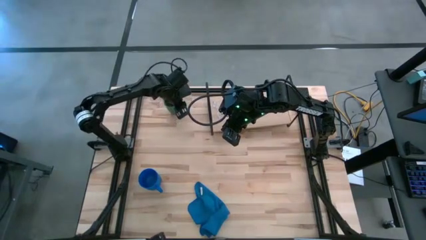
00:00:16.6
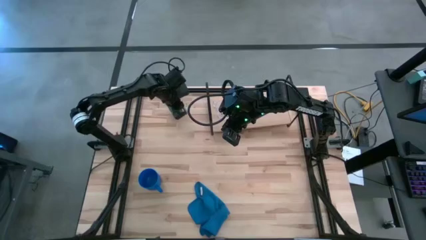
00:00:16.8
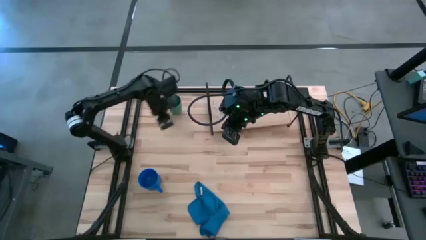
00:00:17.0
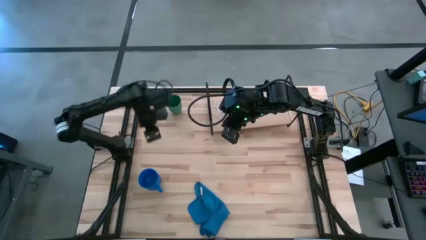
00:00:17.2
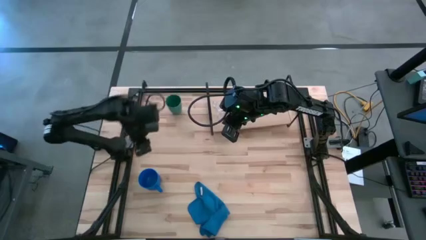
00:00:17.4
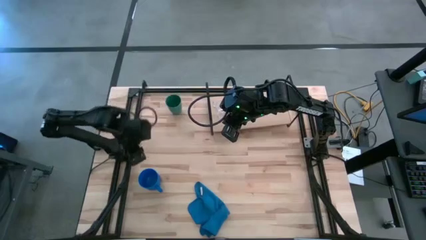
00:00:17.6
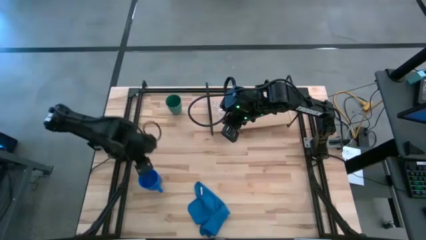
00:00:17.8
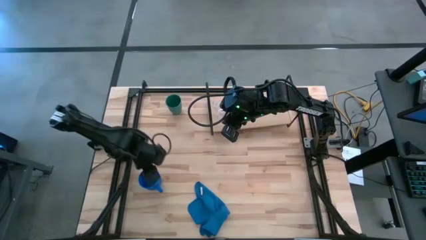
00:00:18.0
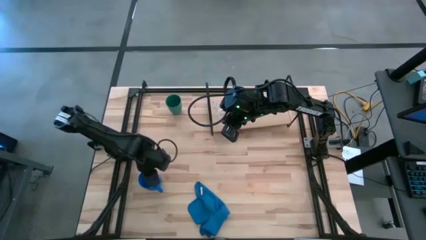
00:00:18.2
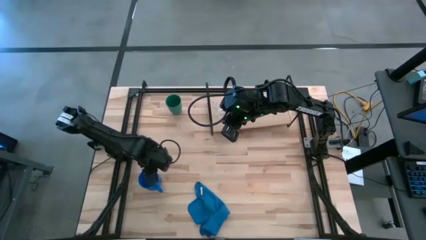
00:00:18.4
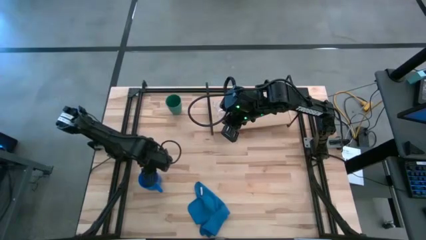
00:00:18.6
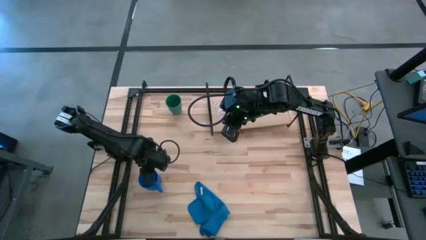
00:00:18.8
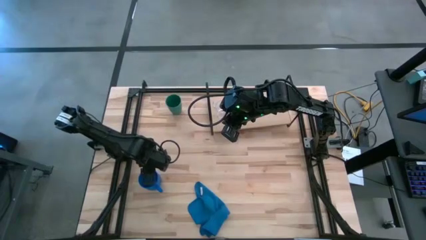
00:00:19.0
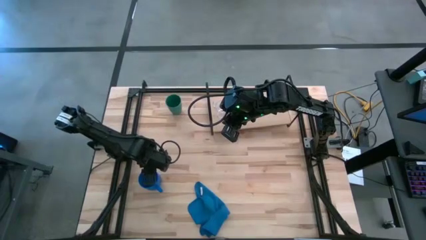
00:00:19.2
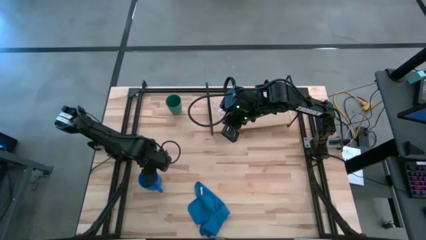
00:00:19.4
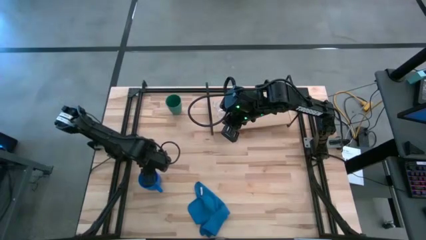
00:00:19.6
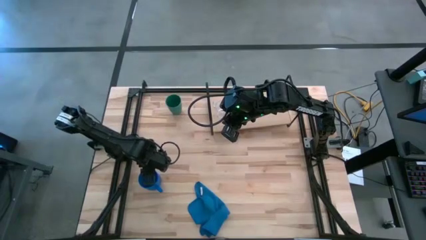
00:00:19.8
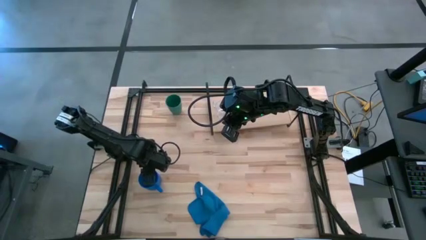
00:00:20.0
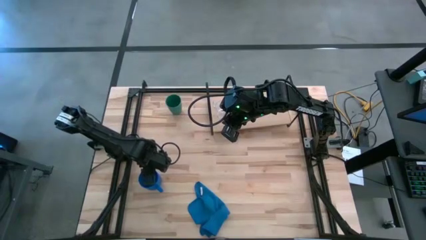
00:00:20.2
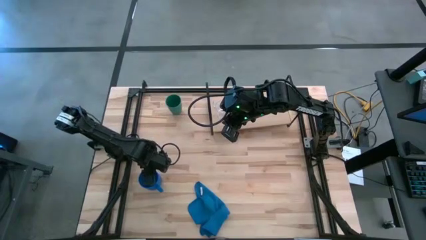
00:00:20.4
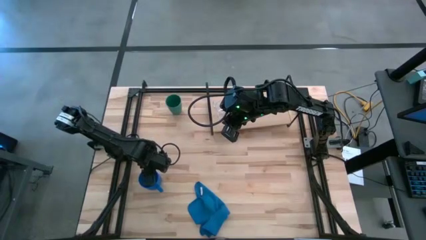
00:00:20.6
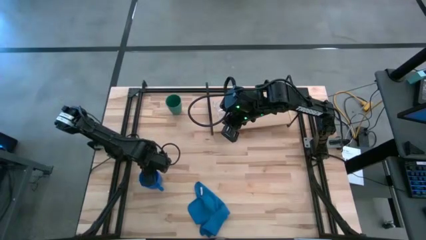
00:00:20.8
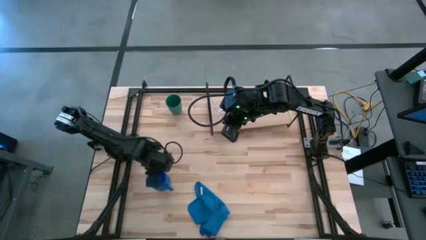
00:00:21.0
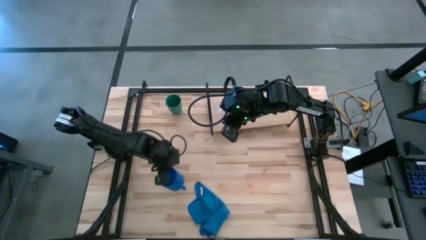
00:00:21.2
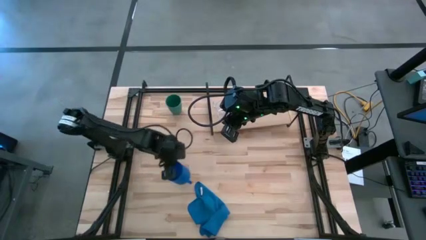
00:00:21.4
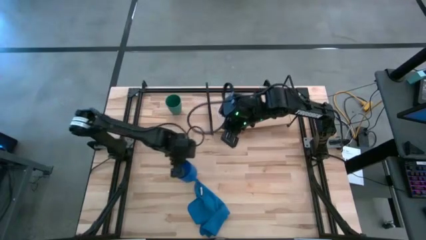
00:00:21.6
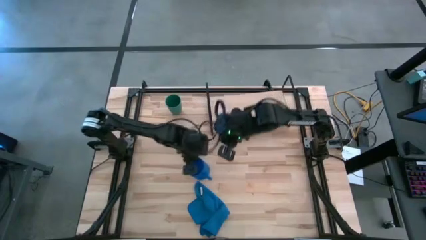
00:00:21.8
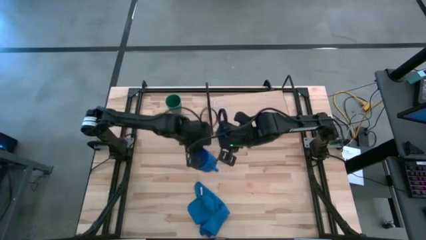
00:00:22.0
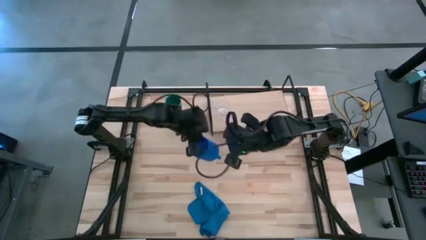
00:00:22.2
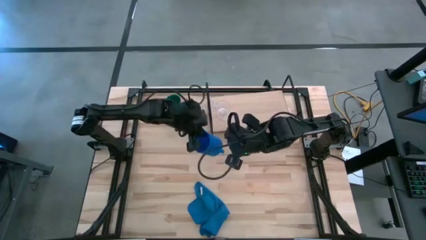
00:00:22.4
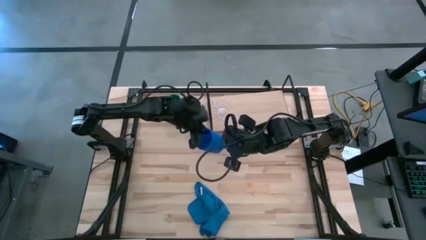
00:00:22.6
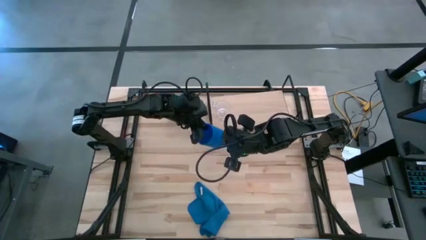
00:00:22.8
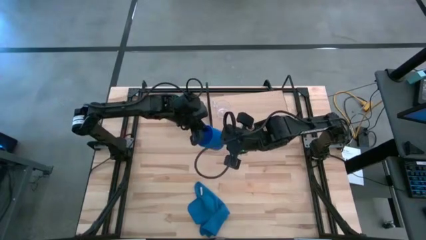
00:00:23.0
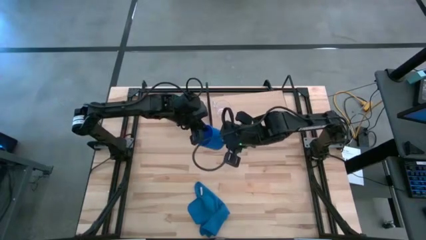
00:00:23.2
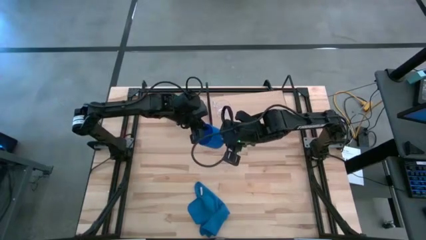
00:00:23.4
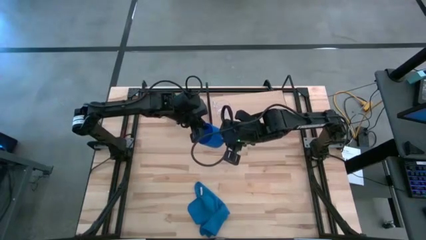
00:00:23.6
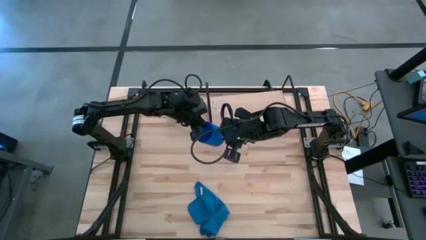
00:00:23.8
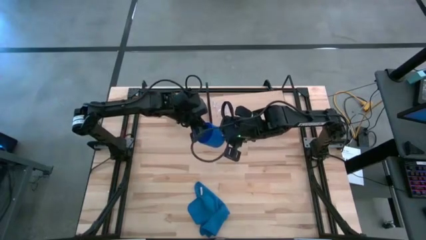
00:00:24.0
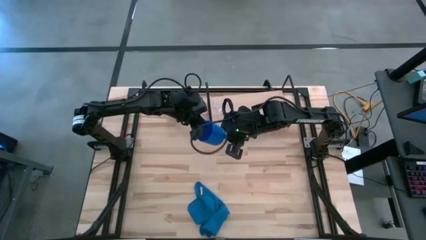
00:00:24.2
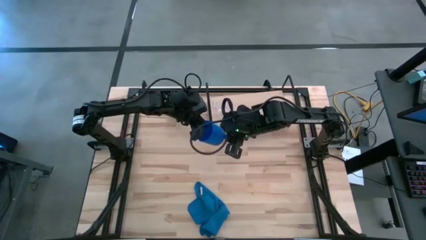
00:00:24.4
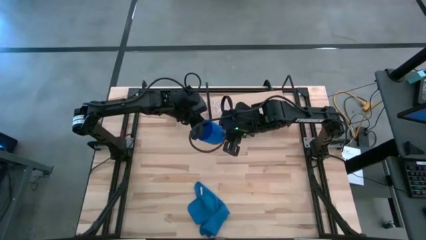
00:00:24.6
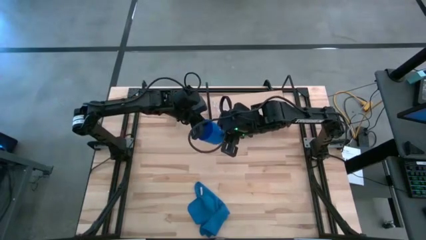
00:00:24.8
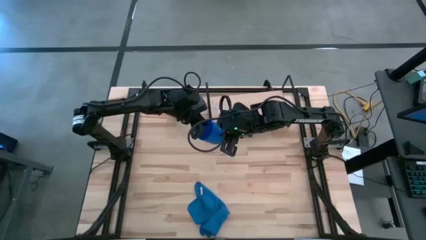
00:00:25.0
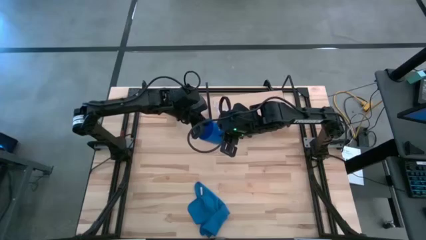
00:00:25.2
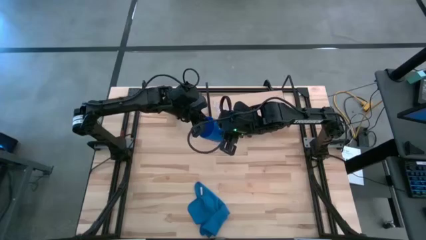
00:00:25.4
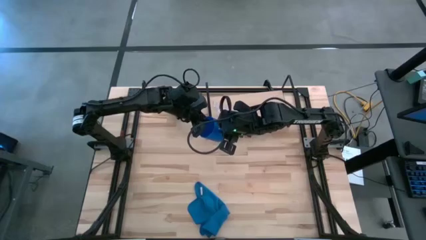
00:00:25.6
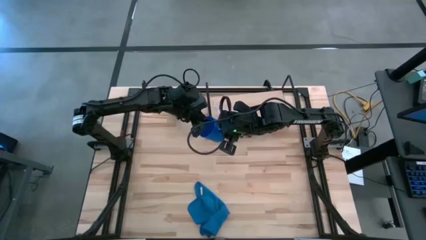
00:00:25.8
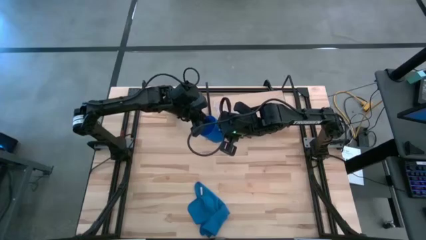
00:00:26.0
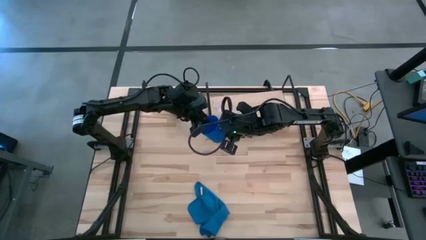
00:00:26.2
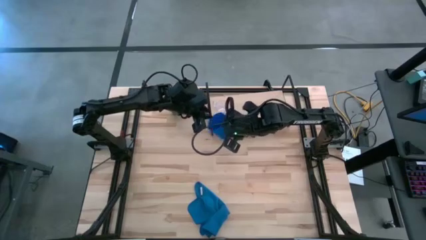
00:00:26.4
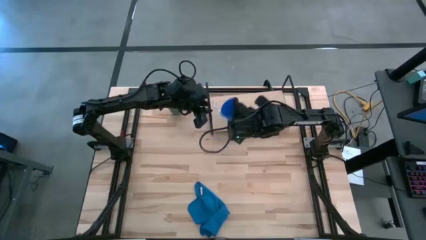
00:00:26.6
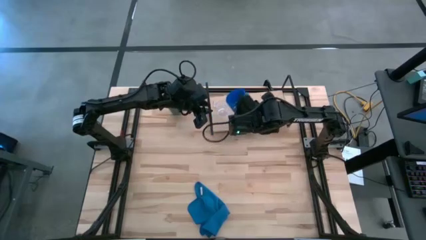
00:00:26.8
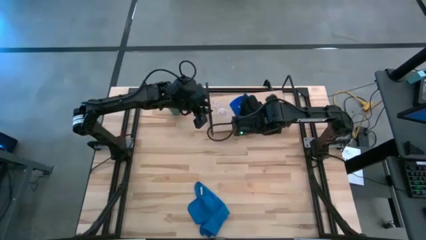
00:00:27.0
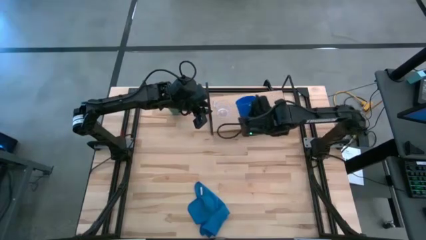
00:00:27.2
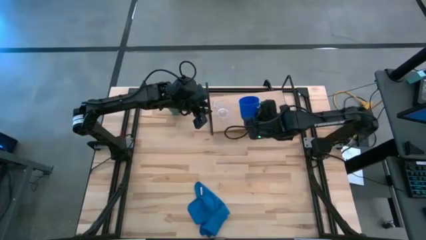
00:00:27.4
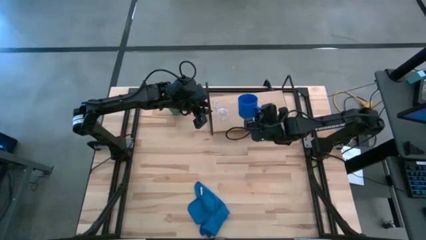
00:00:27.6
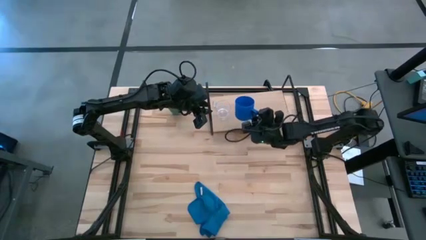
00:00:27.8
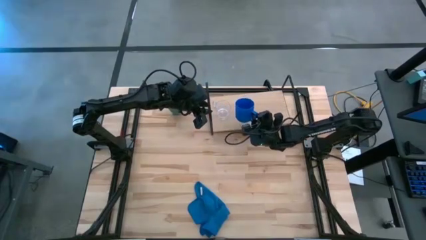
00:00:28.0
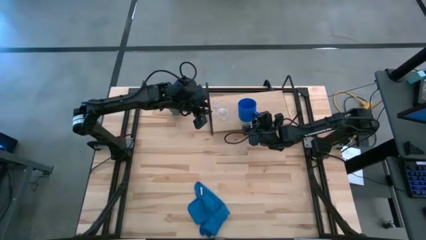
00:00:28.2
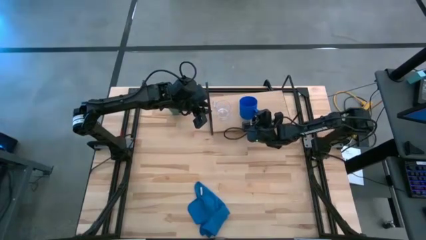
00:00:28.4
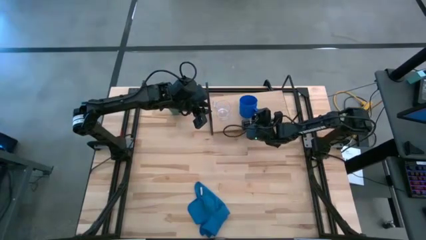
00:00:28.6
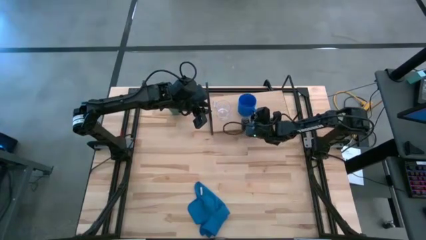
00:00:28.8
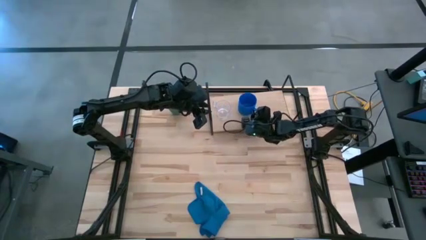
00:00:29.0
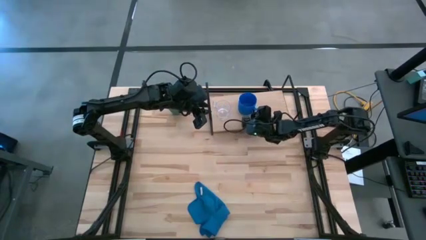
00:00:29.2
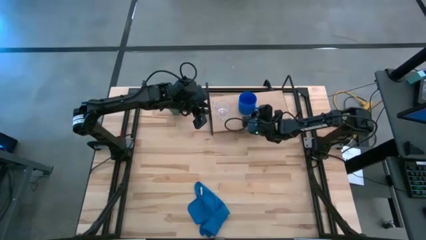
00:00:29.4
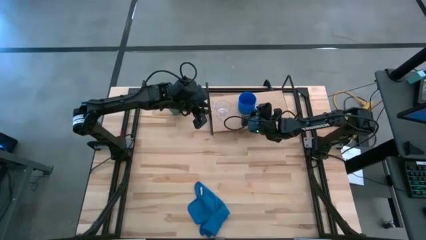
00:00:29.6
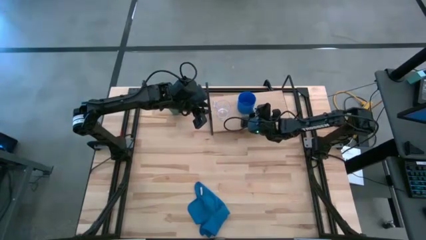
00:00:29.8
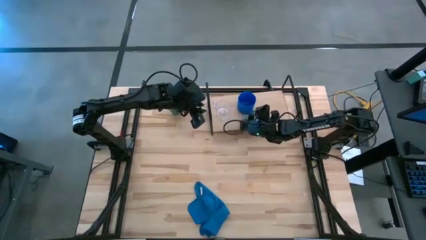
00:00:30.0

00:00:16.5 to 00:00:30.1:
Task: Stack small to large cups/mugs on shelf
Put the blue mug on the shelf

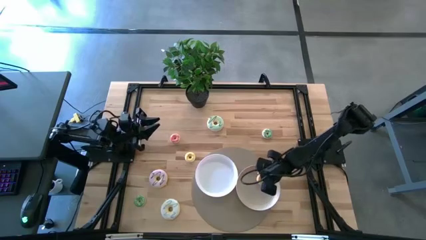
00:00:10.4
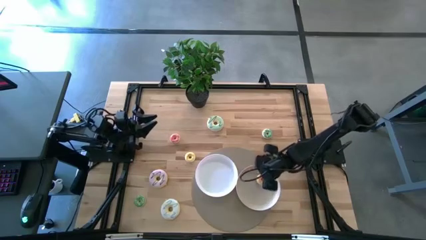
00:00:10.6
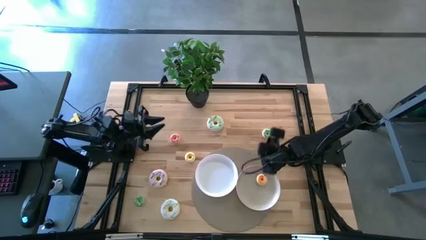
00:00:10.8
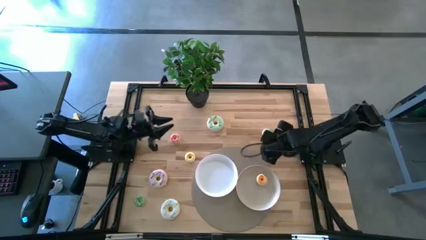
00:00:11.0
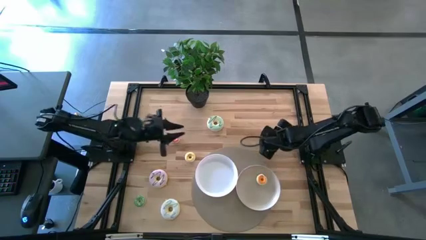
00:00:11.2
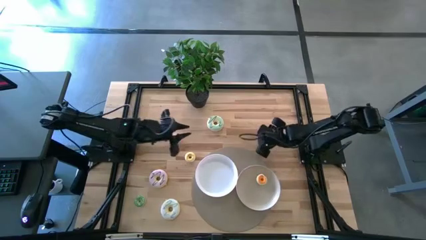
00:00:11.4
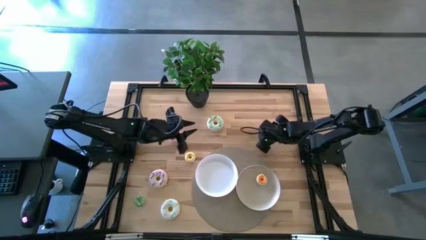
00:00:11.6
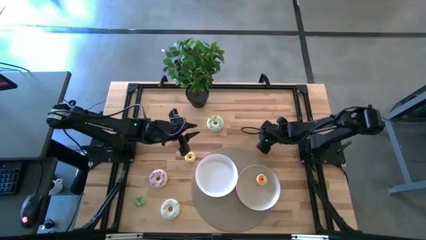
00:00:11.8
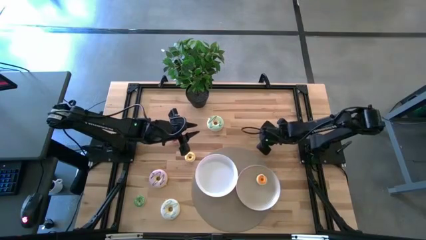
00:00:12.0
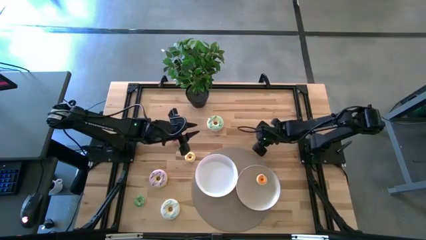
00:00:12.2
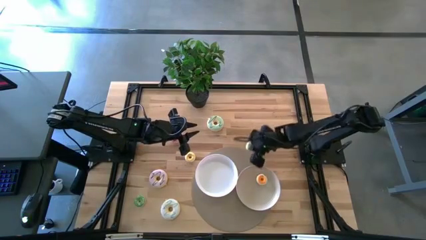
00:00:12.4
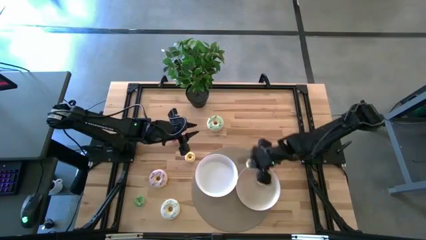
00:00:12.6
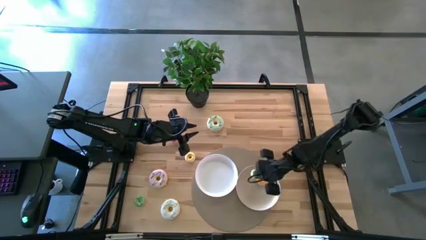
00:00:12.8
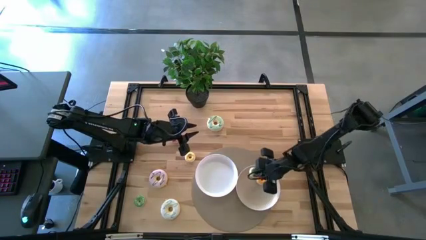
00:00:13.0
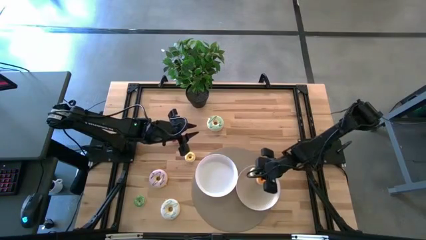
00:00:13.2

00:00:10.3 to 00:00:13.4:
Task: Pick & Place donuts
Put the top small green doughnut on the gray plate
